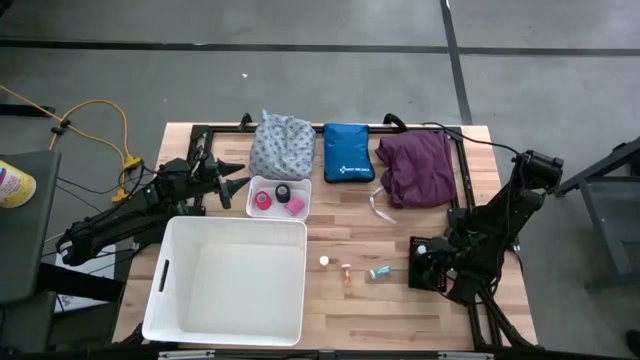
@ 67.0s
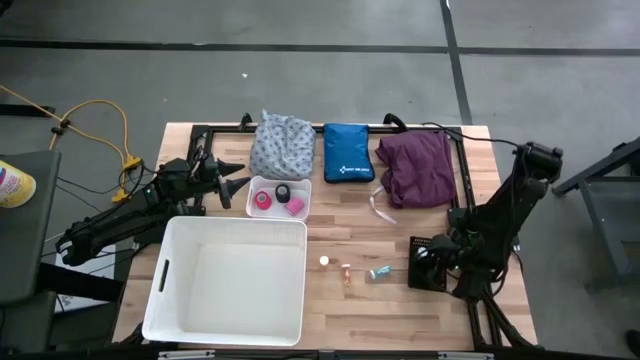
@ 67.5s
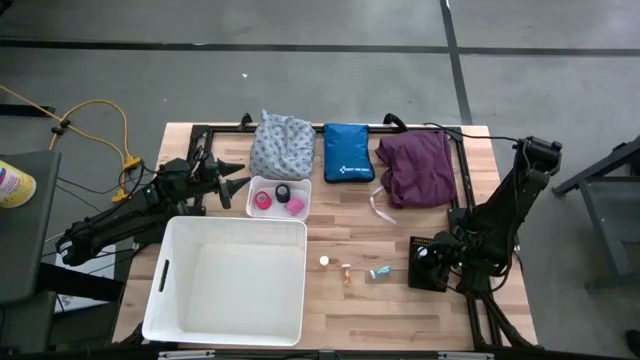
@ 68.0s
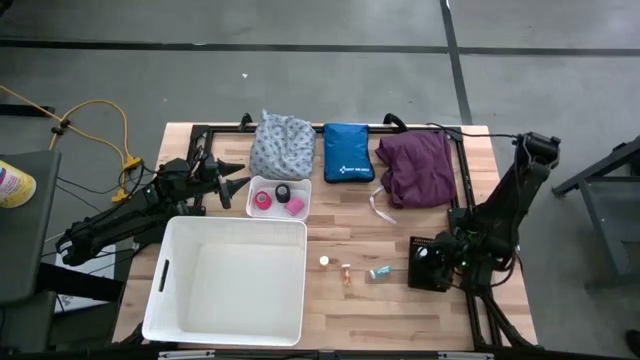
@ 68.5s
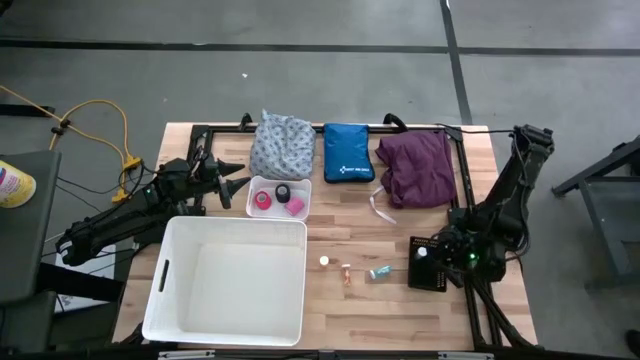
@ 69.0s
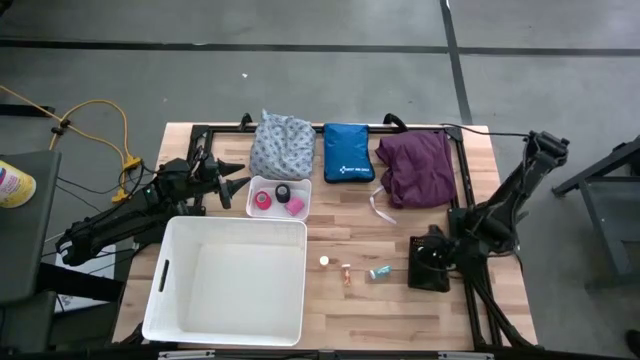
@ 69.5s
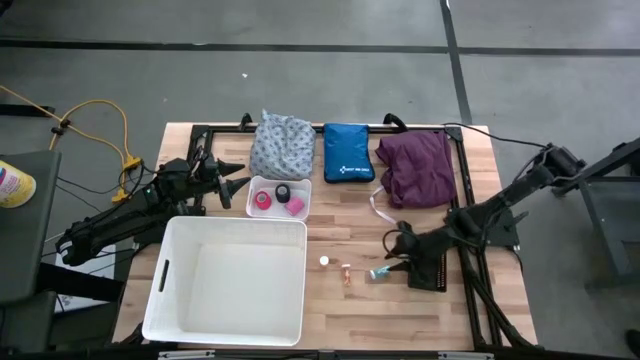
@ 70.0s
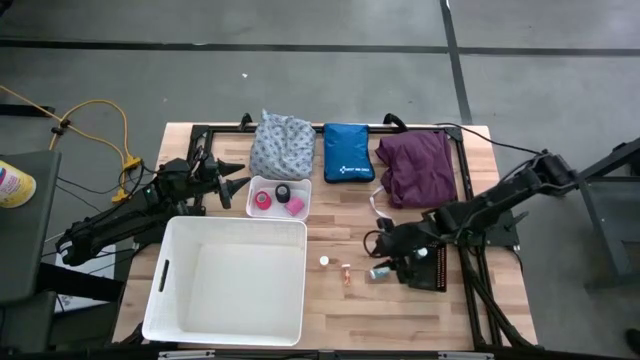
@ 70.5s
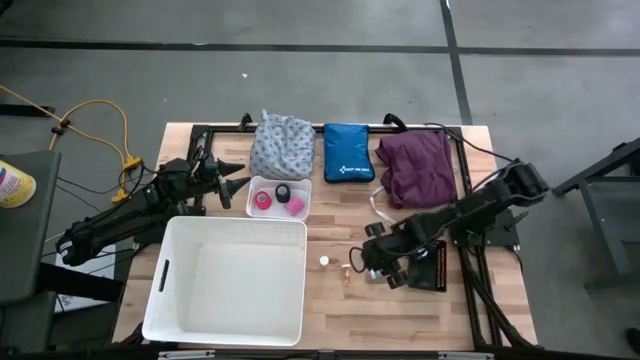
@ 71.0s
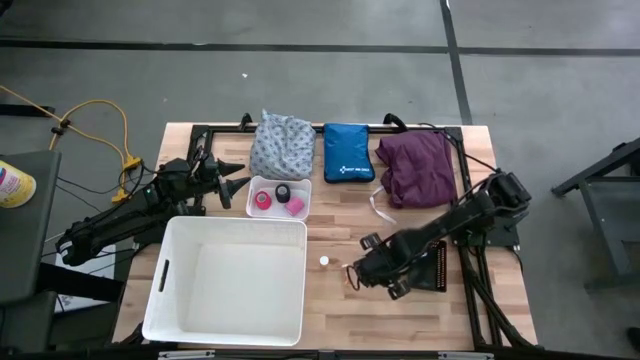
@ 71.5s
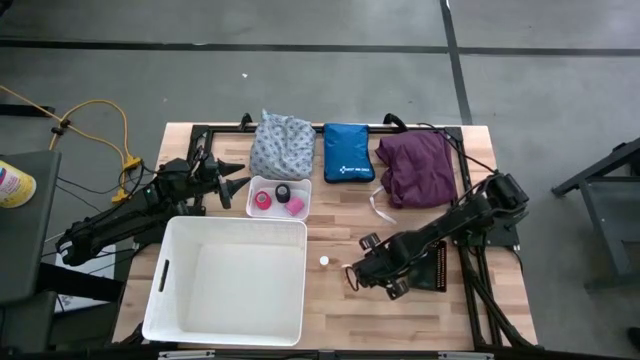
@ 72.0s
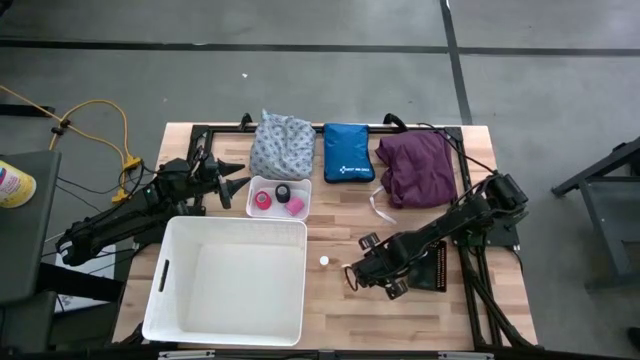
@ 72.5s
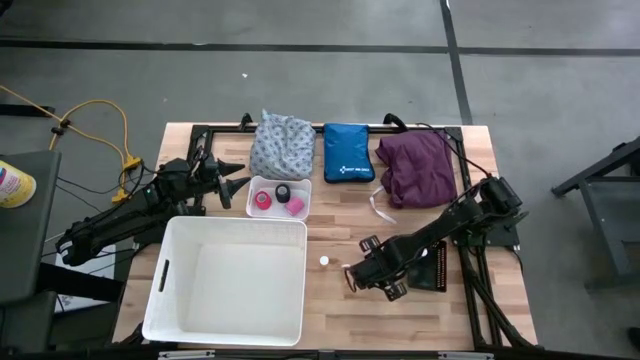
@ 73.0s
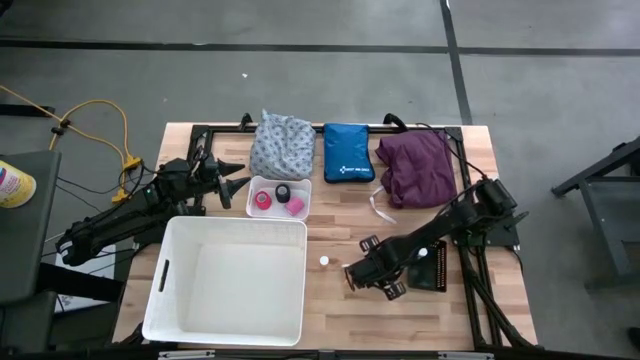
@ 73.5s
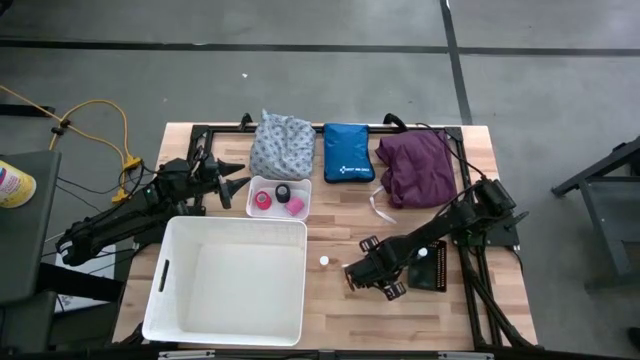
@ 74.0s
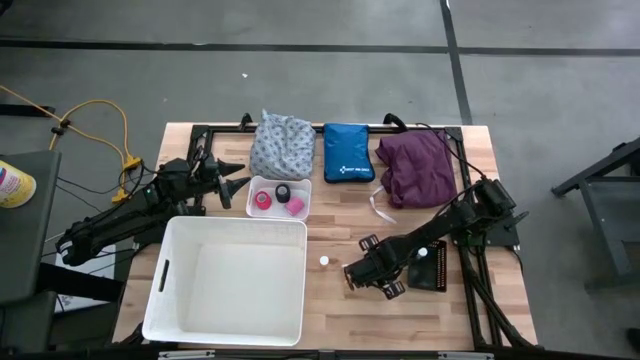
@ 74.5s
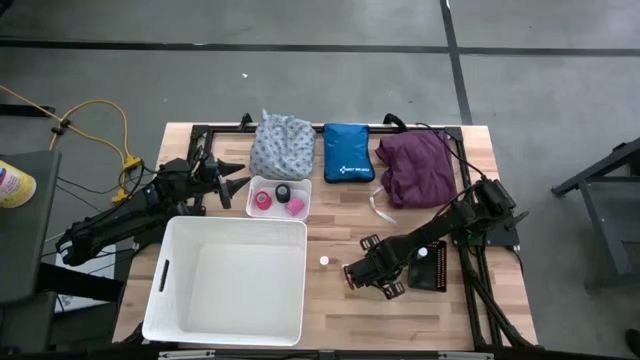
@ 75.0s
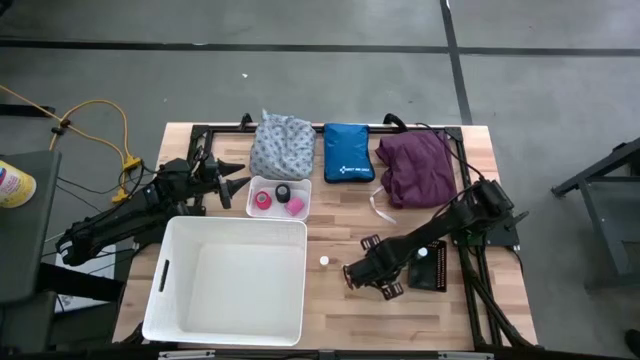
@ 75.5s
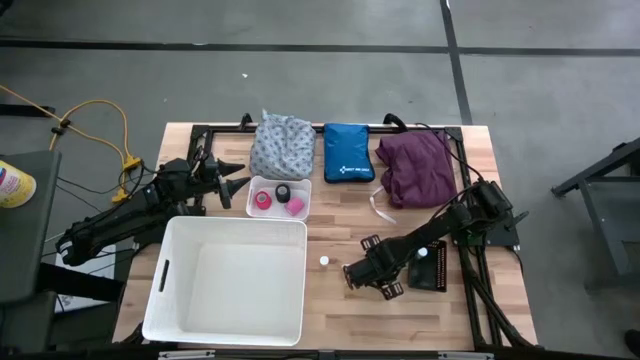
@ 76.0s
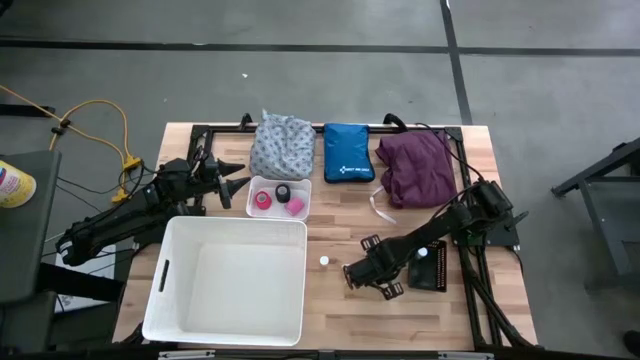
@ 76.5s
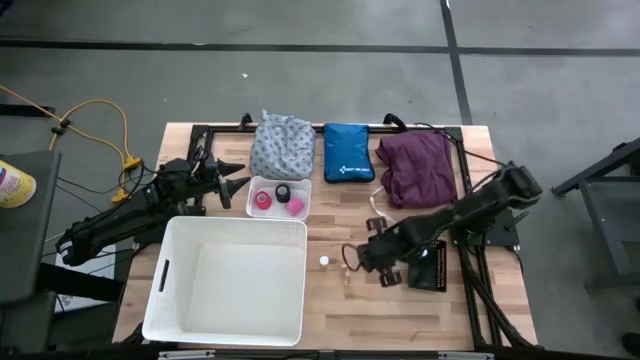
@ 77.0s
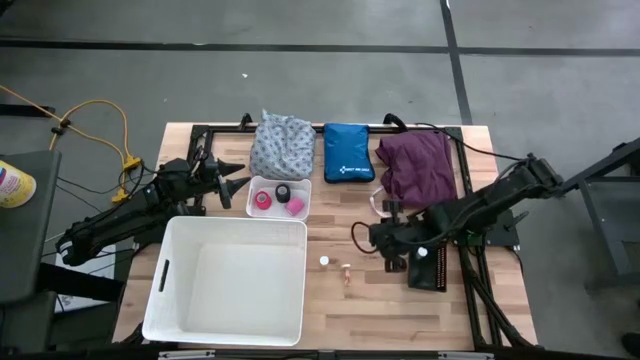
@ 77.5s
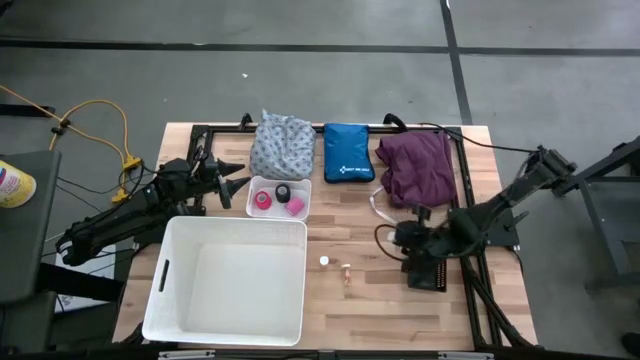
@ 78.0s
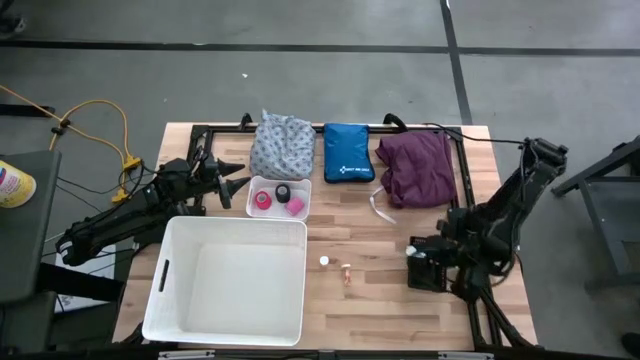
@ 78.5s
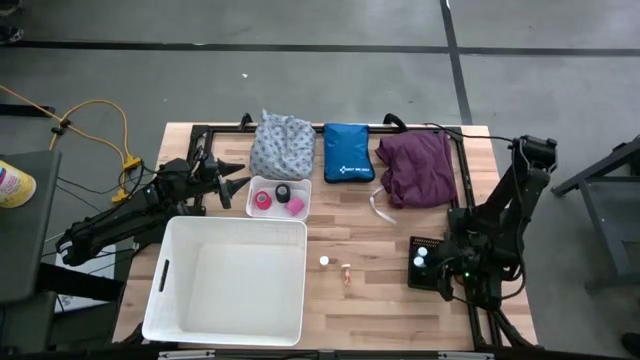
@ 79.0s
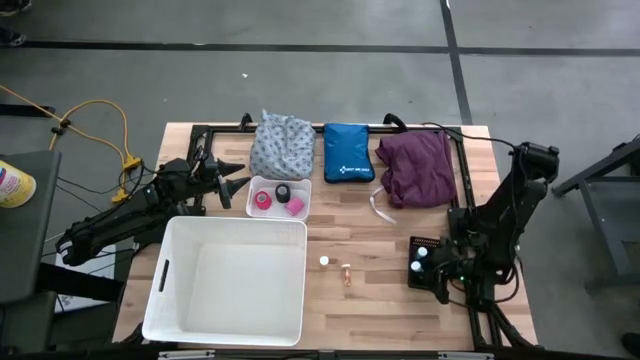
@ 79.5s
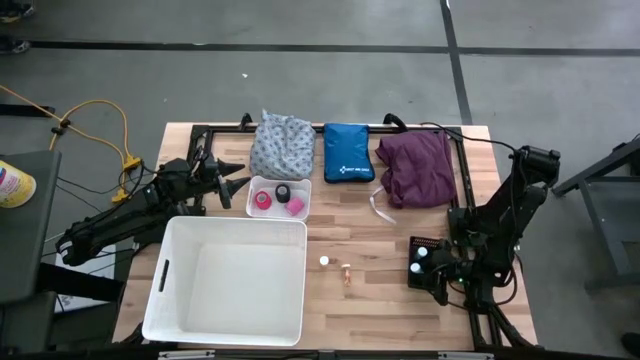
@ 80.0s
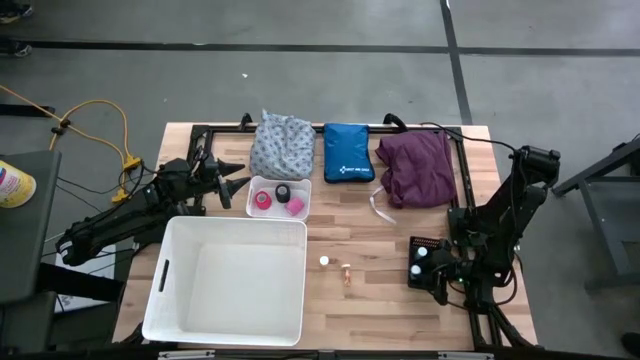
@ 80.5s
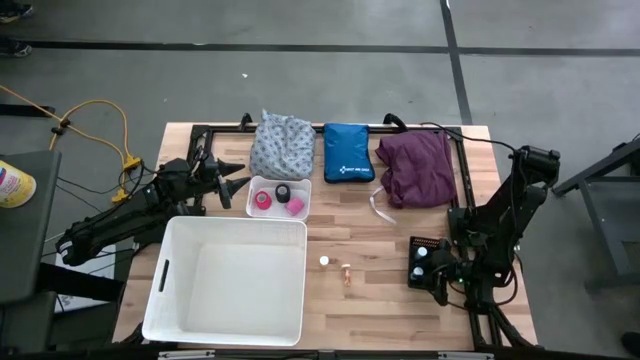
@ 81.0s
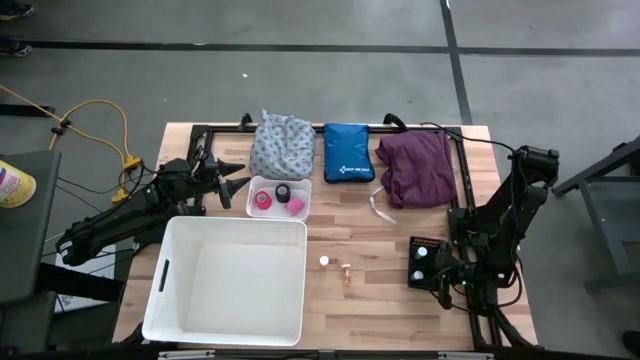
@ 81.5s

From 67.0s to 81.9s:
Task: Pick & place medical supplies in basket/bin
Put the blue pill bottle into the black bin

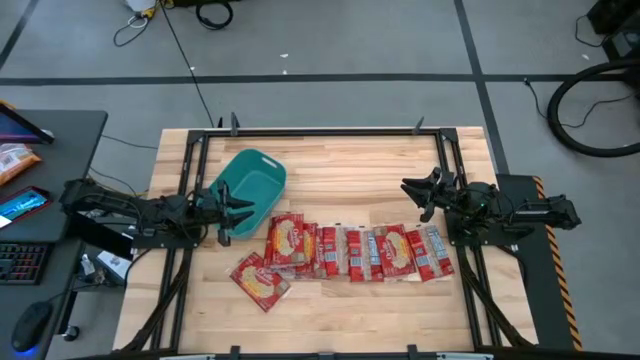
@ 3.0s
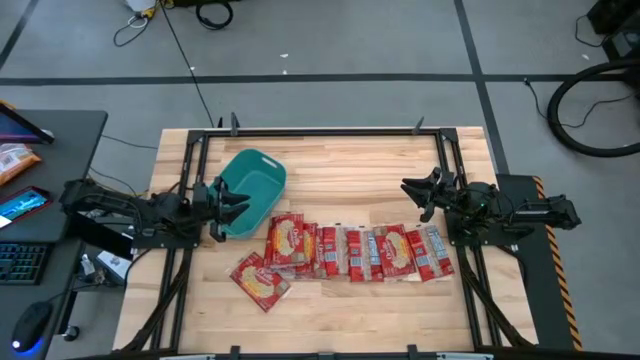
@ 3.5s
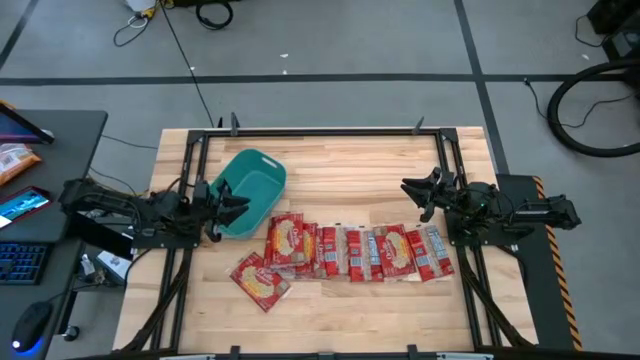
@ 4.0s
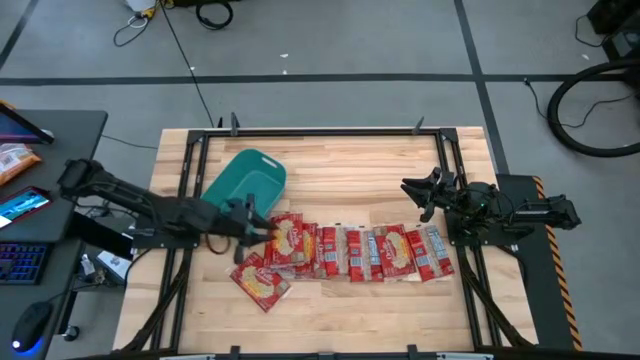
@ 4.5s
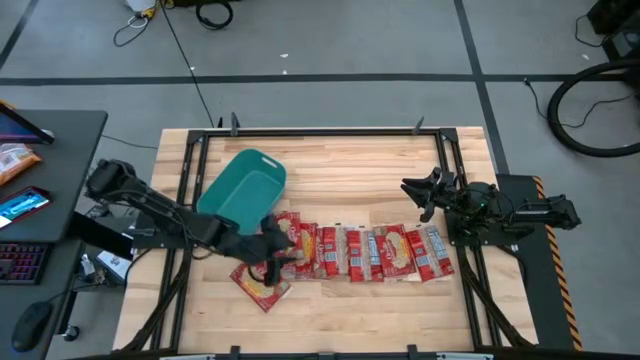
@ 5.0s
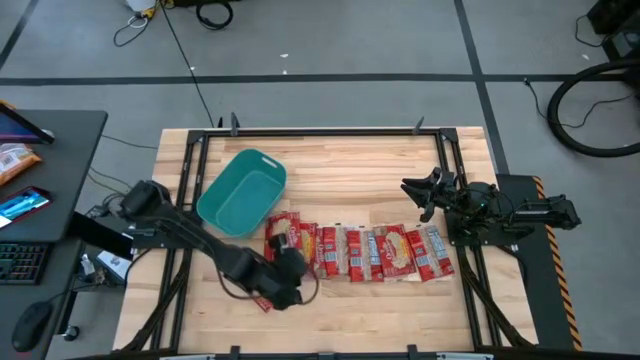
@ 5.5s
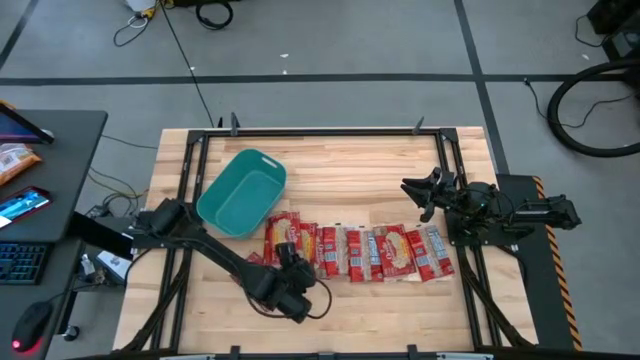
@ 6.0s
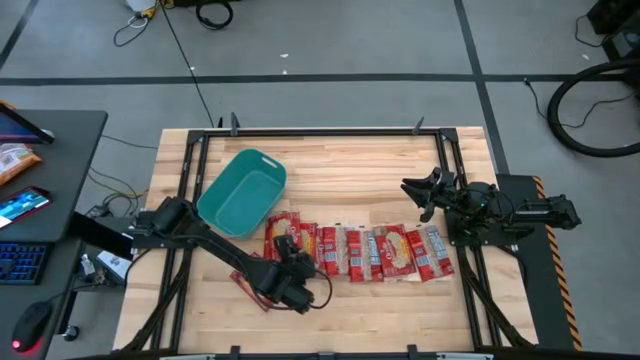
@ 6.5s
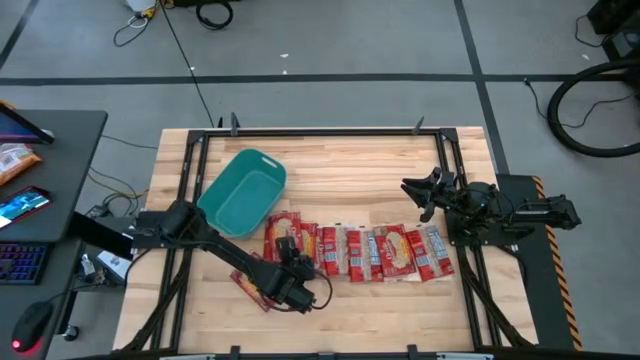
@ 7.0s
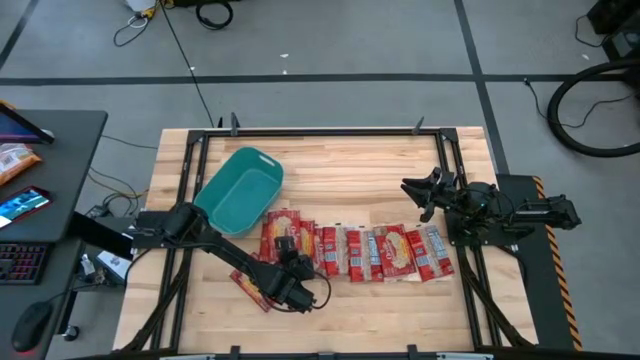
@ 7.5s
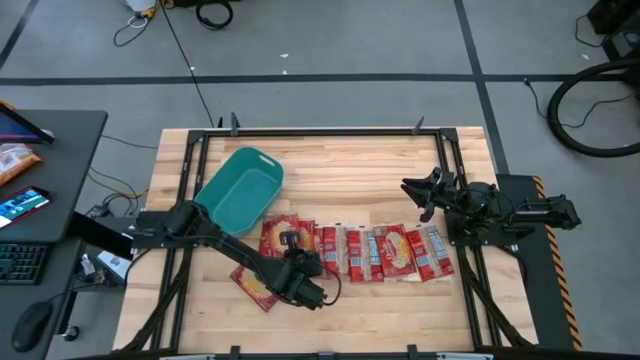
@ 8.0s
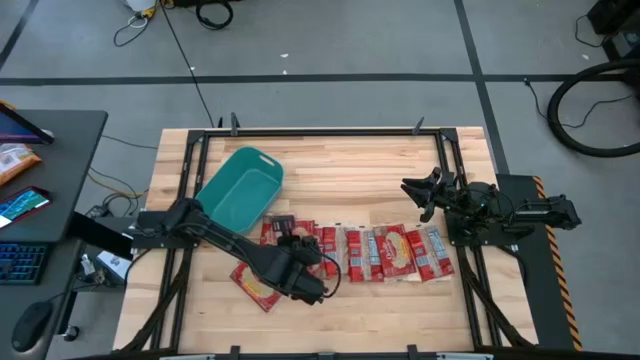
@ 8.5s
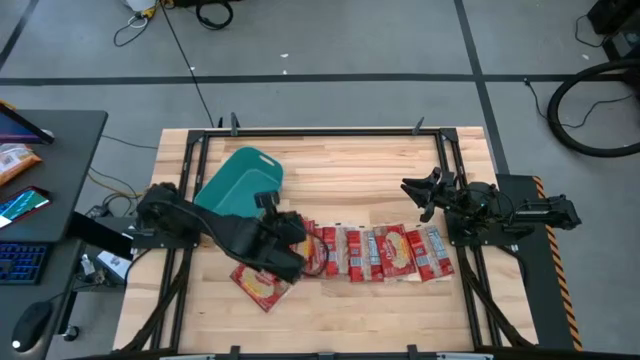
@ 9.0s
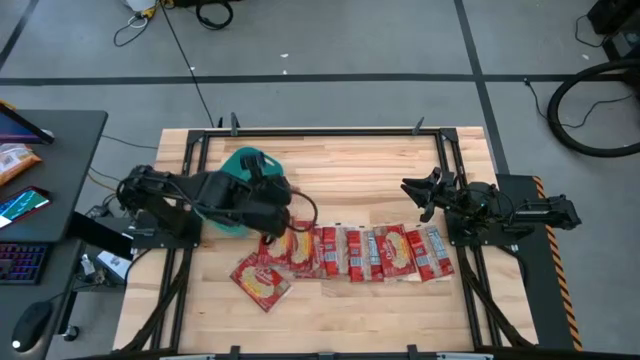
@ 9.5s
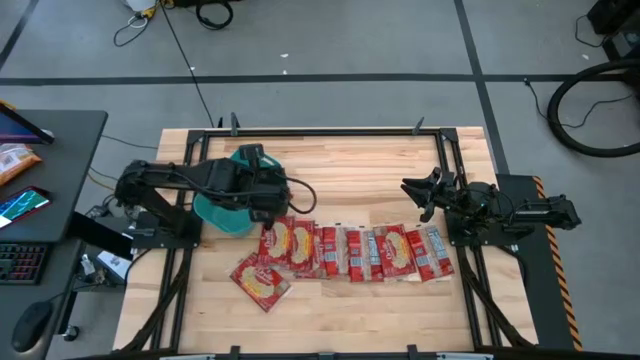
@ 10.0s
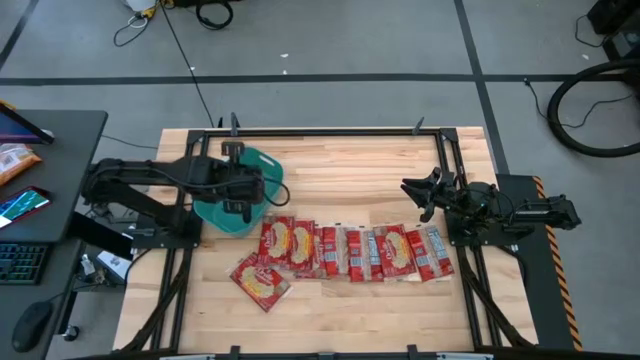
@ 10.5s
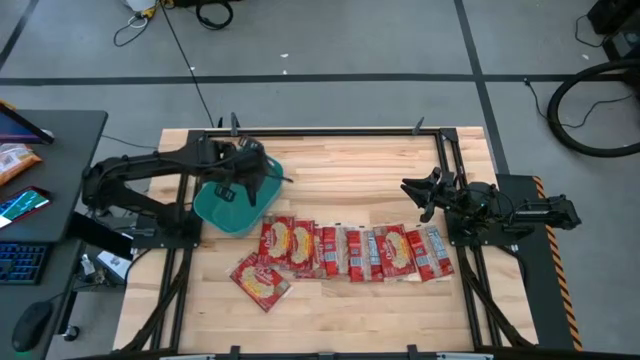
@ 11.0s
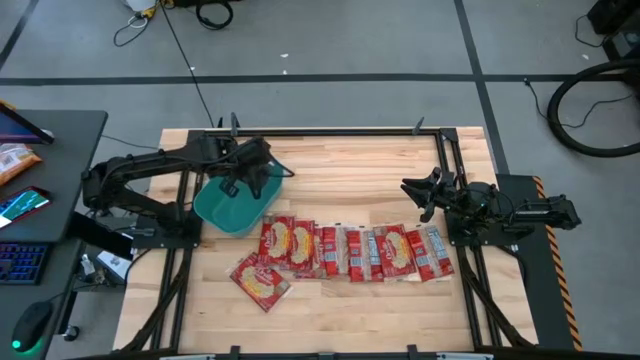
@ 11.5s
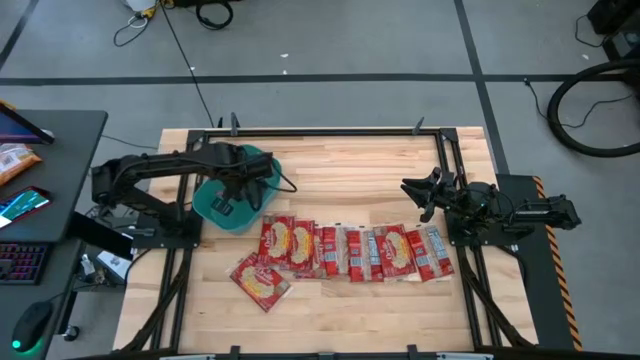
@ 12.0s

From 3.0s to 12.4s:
Task: Sort popcorn bags into baskets
Put the red popcorn bag into the green bin
